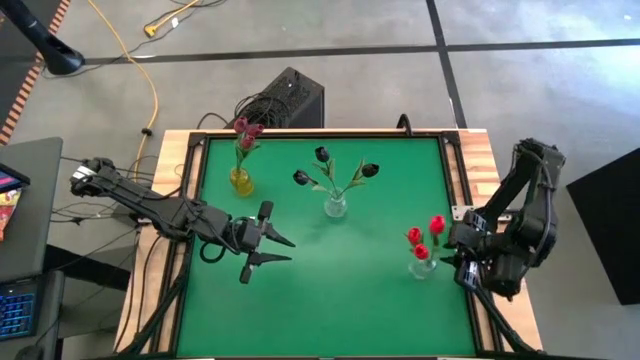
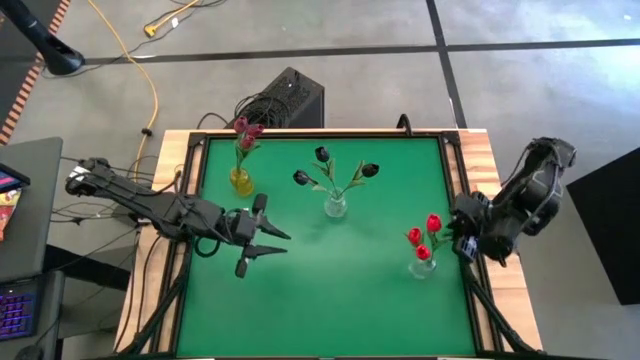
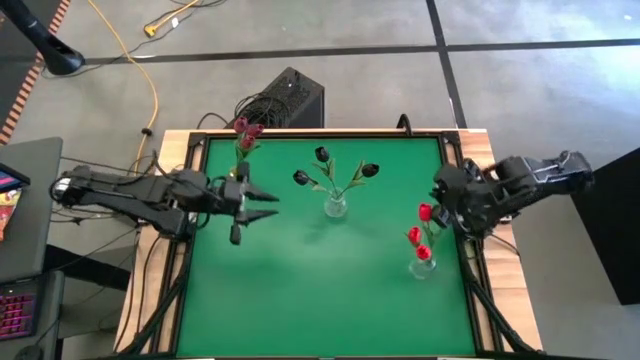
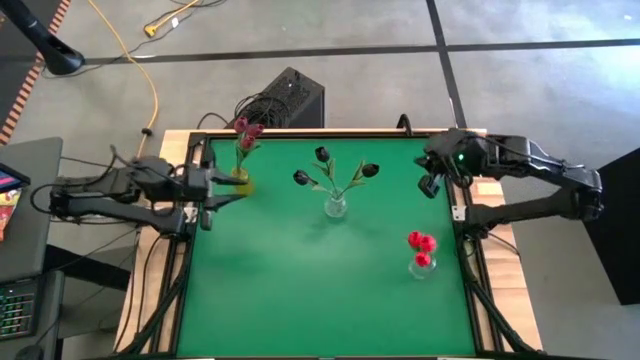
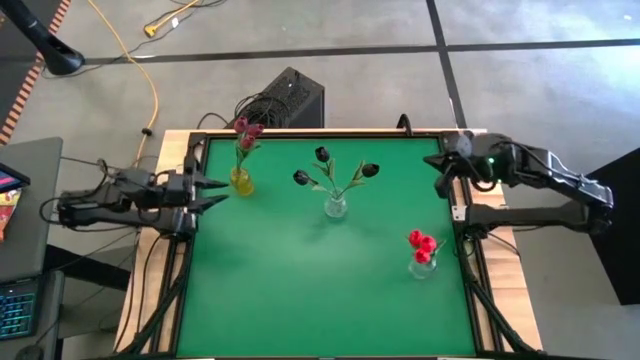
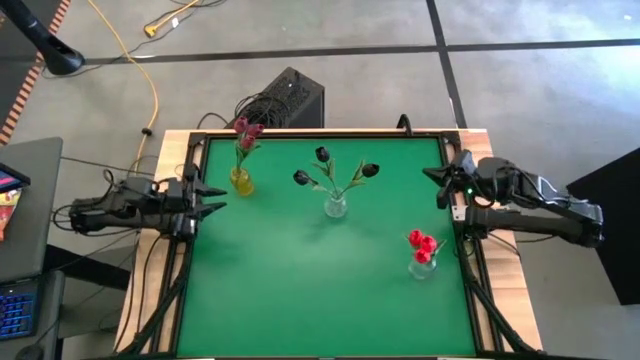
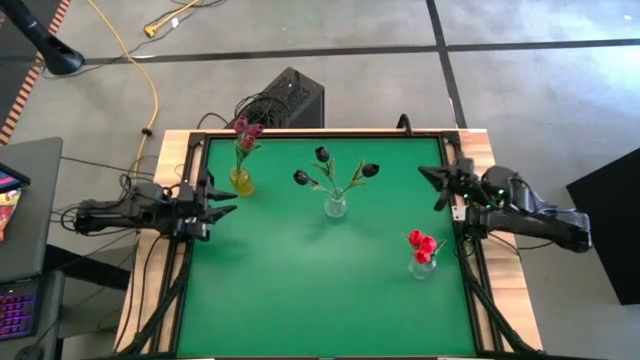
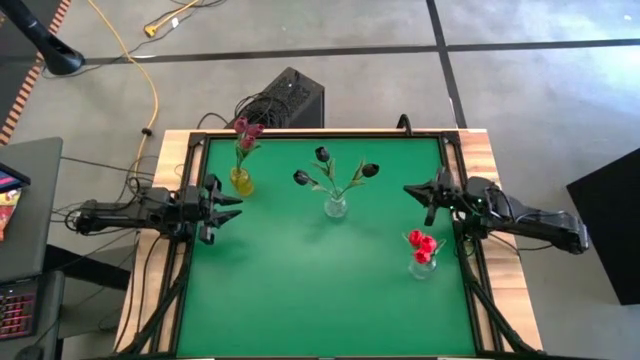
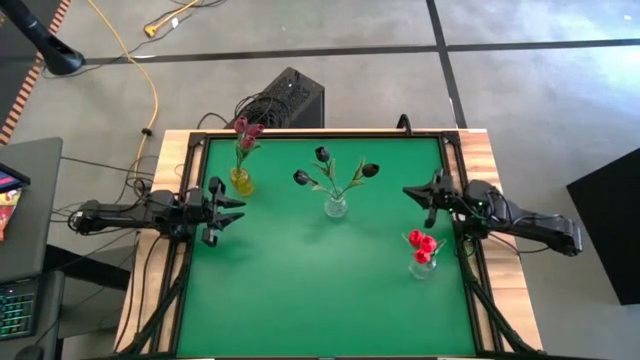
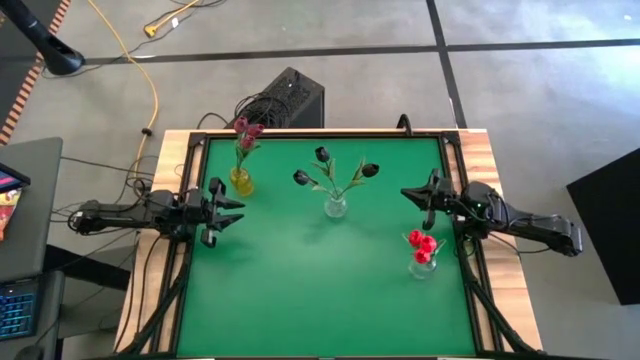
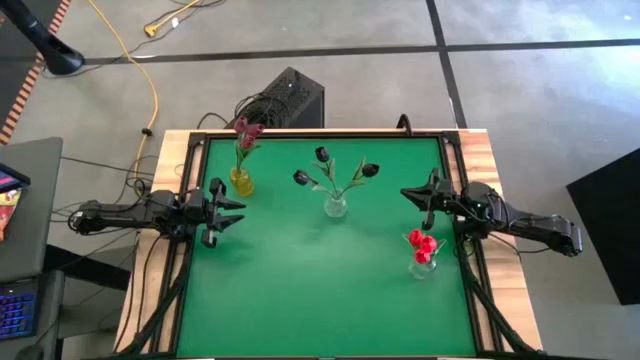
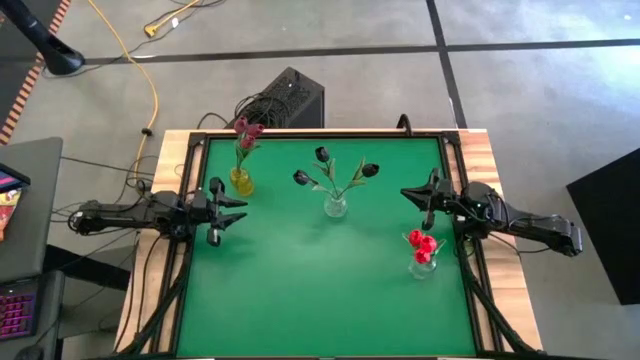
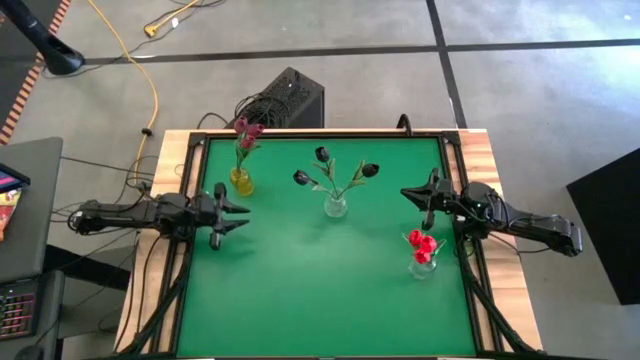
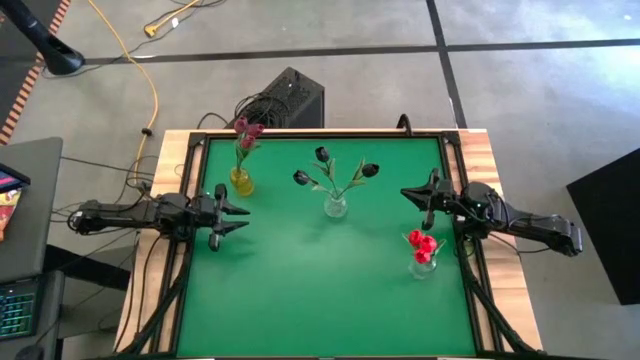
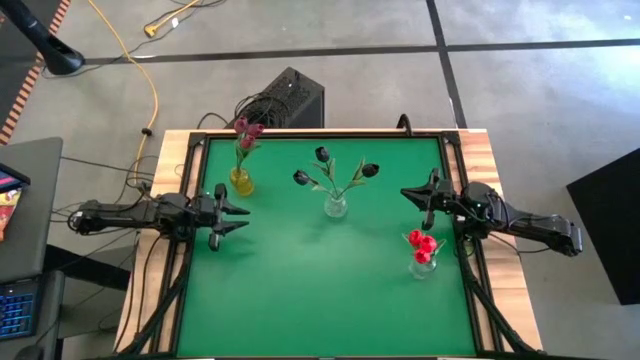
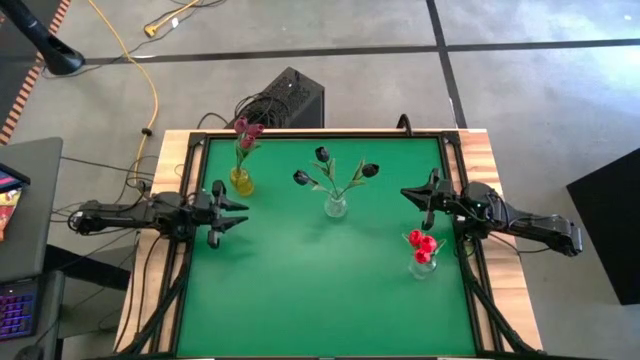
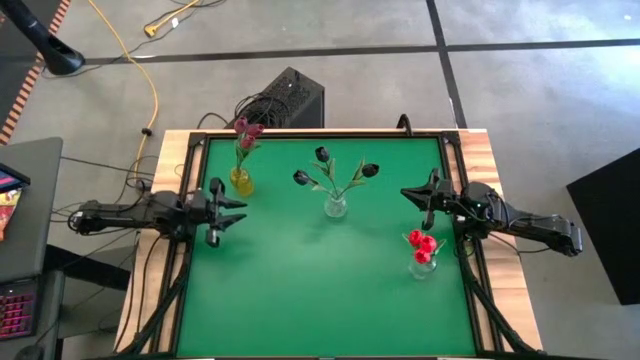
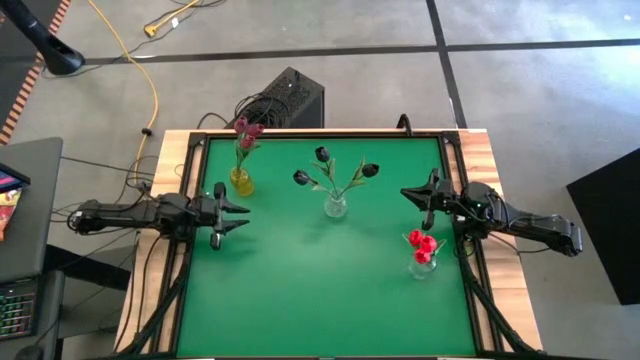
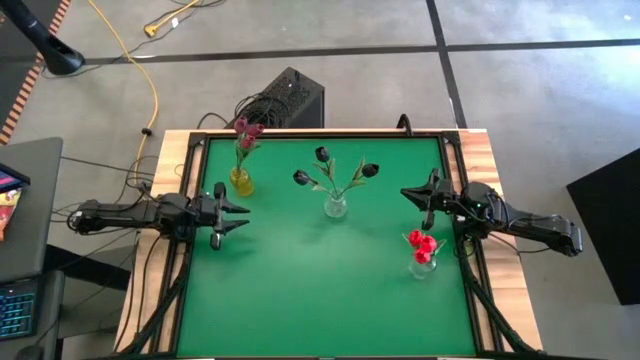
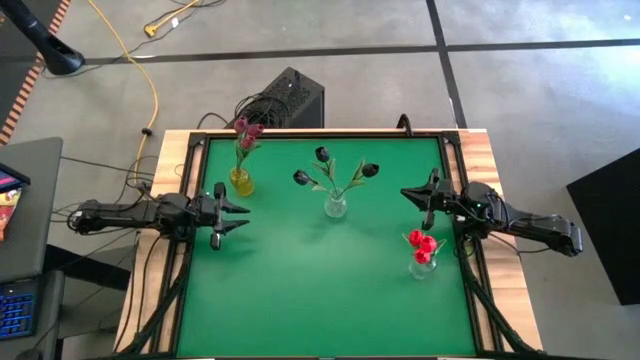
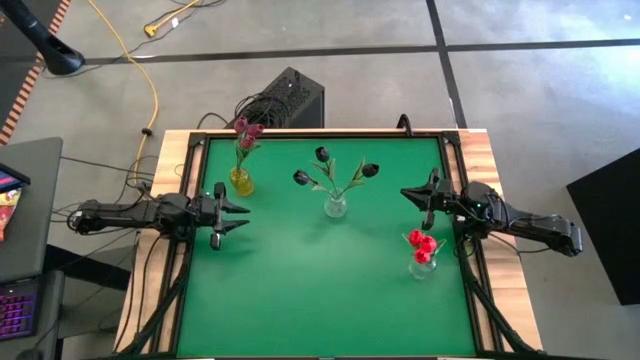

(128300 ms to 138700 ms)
Task: Sort flowers into vase by color
Return to Home Position

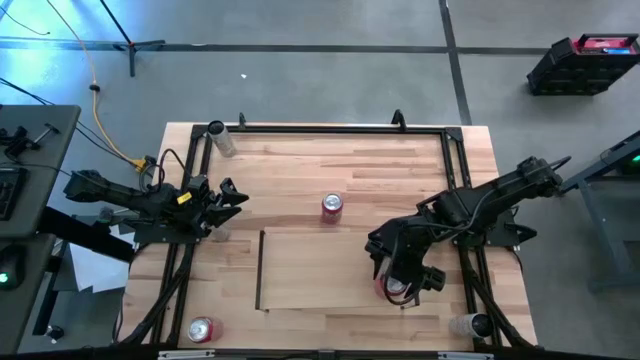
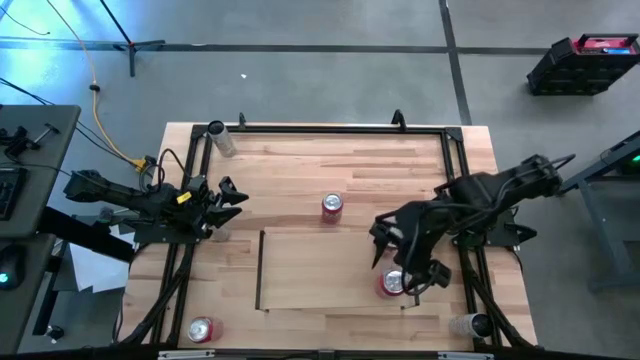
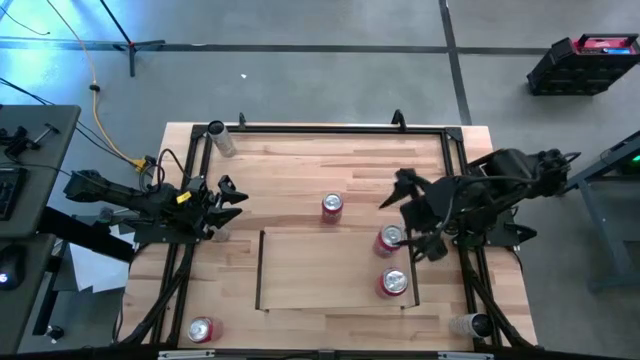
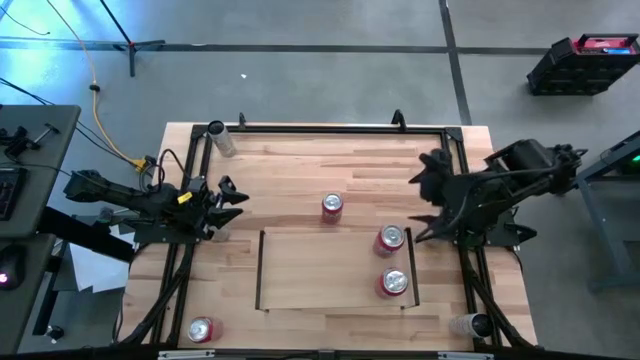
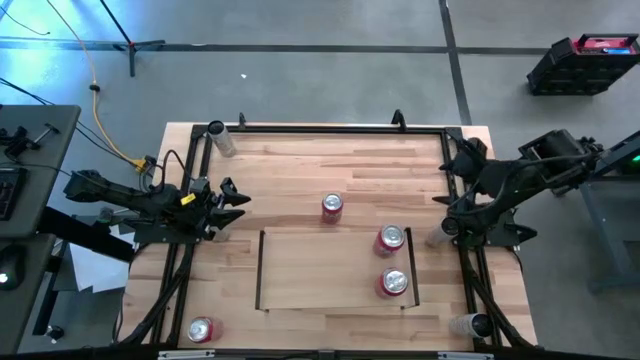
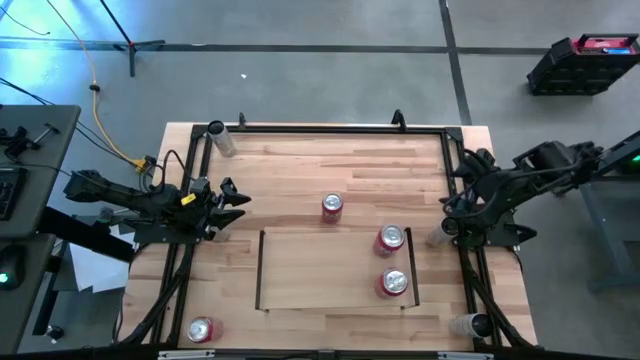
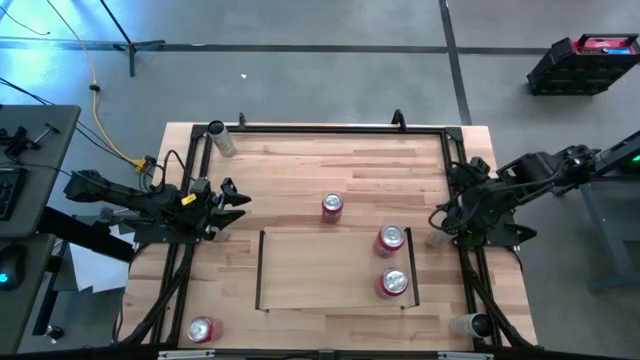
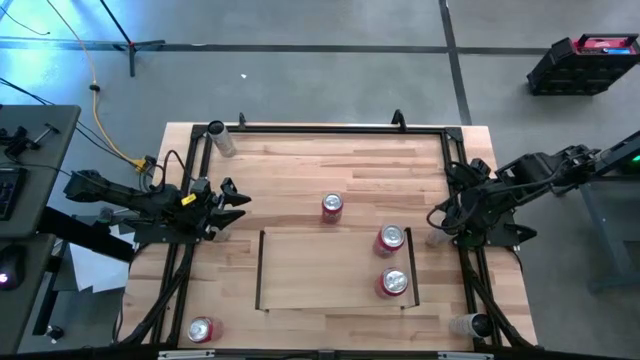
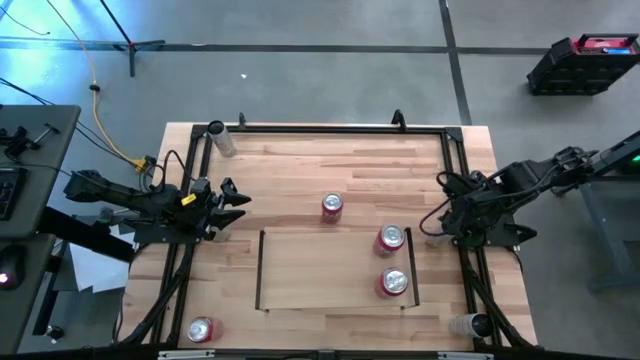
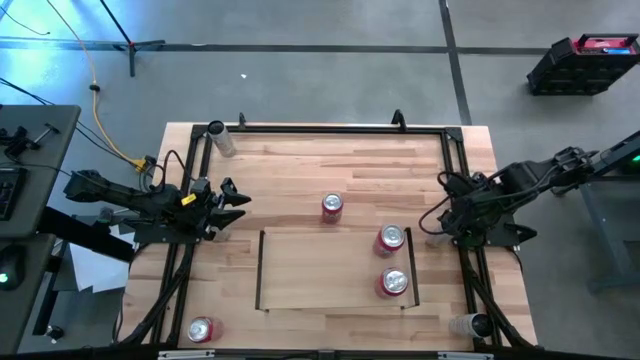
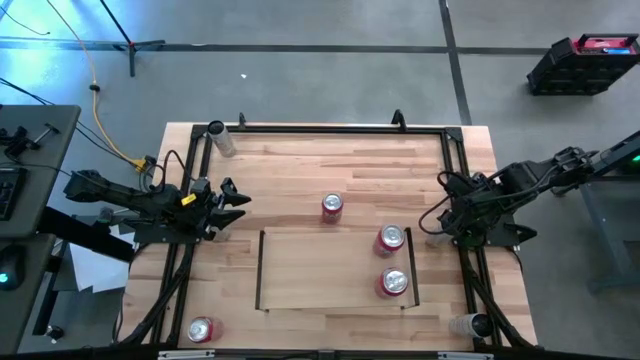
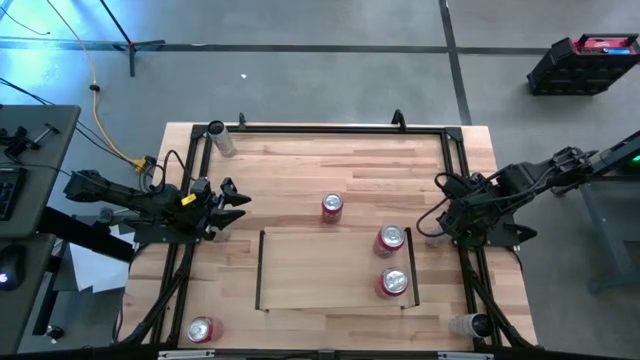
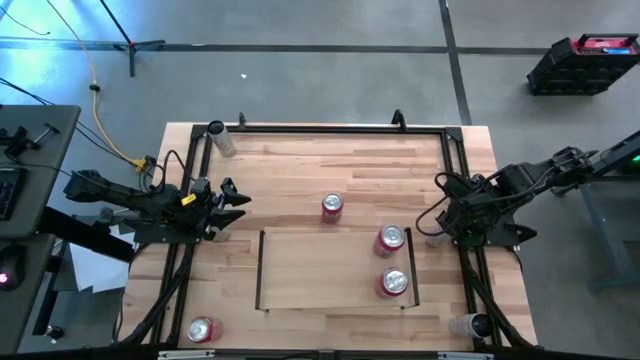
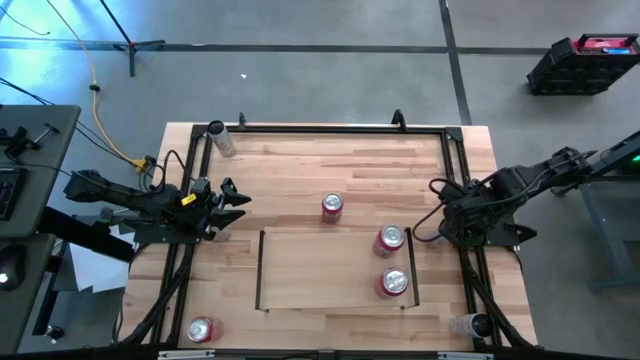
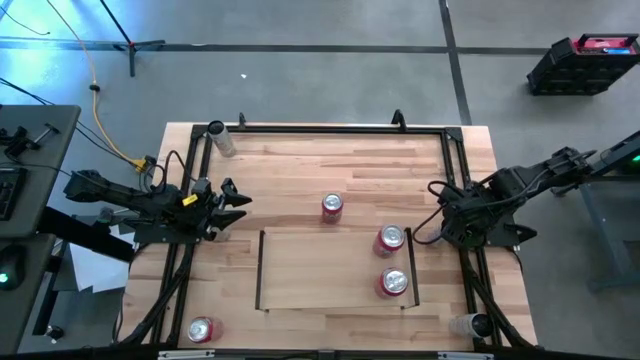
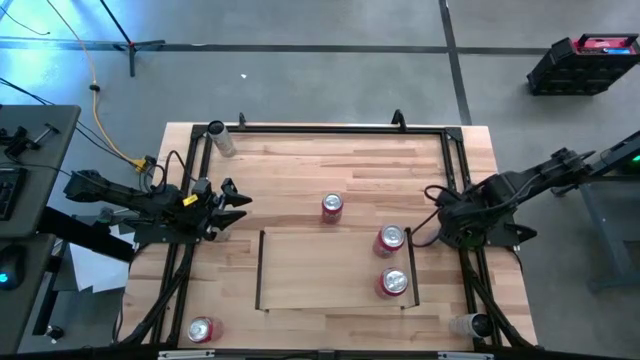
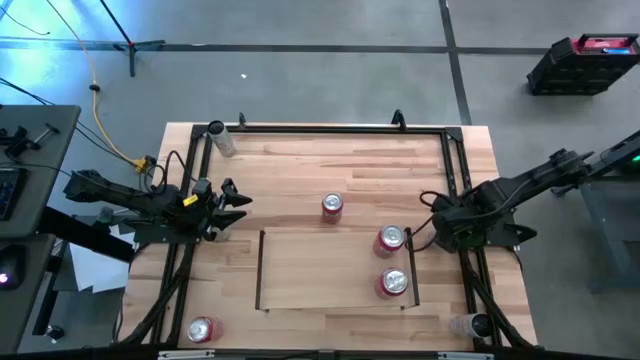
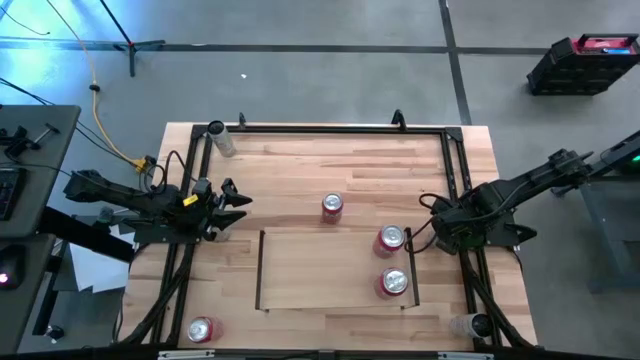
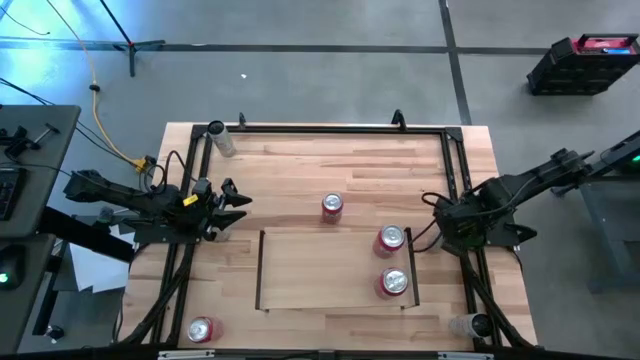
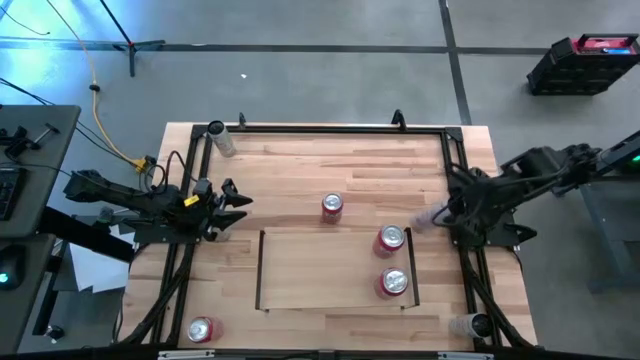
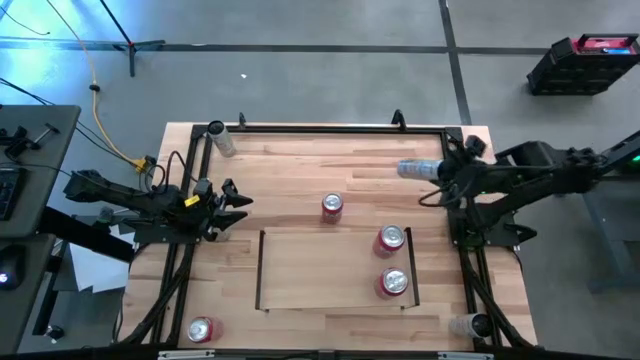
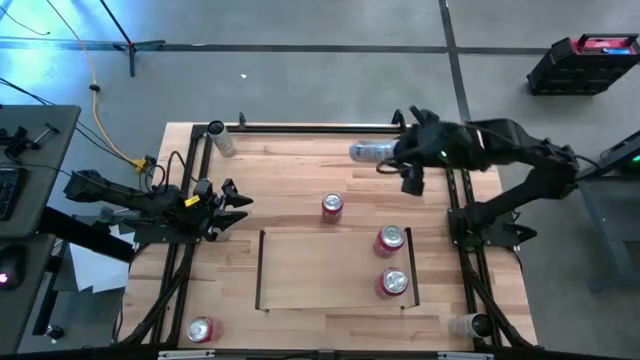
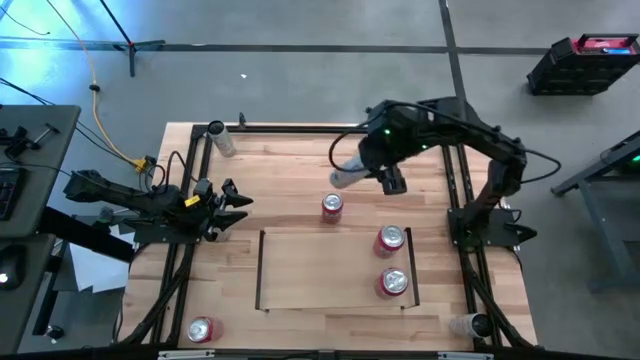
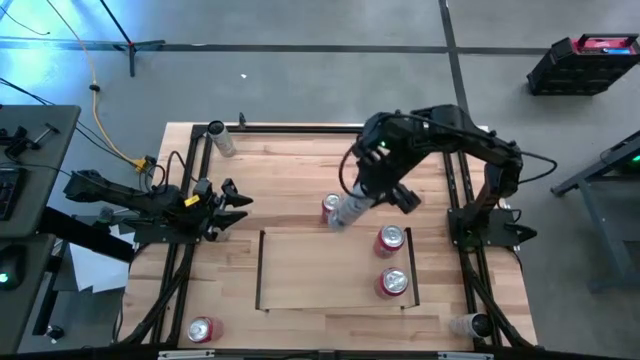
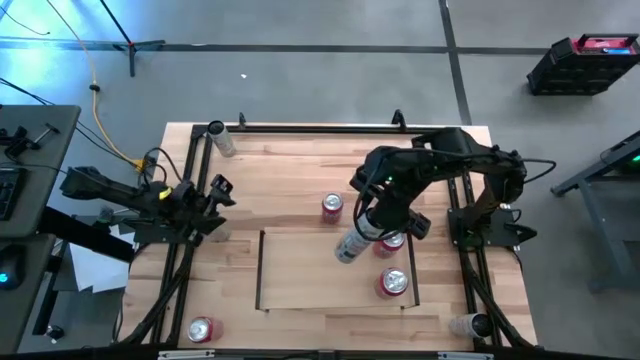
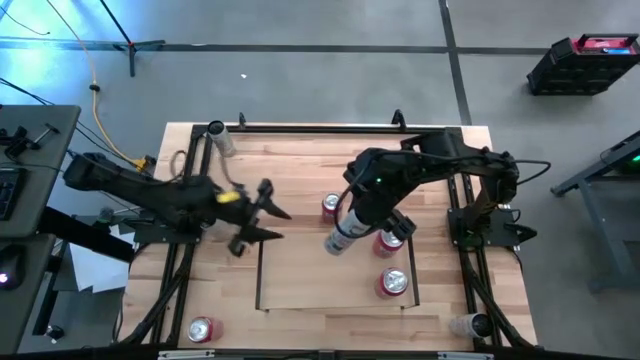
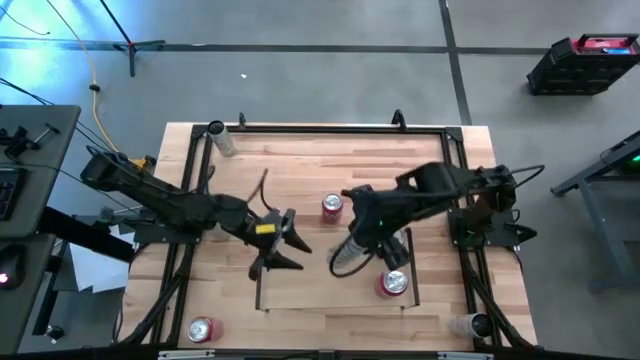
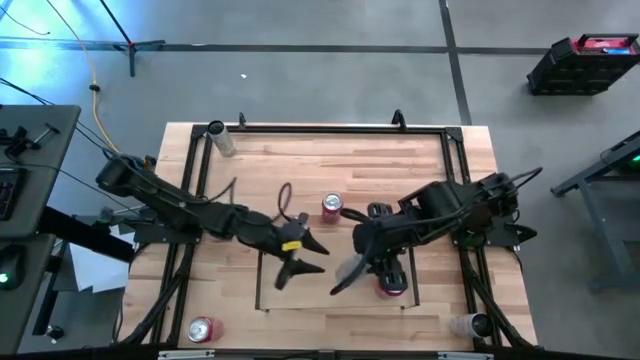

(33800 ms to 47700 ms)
Task: Place canned beverage on shelf
Put the middle right white yellow soda can on the shelf
